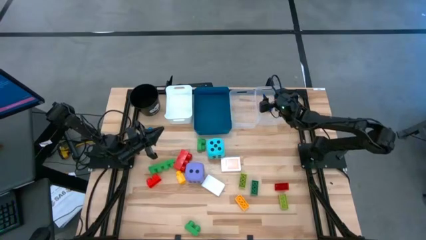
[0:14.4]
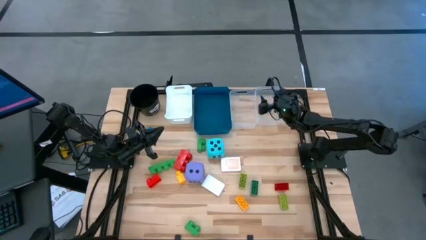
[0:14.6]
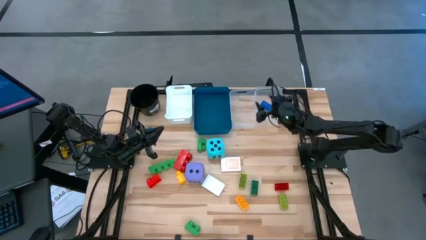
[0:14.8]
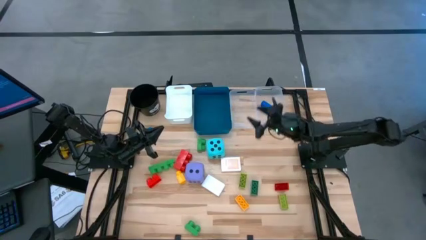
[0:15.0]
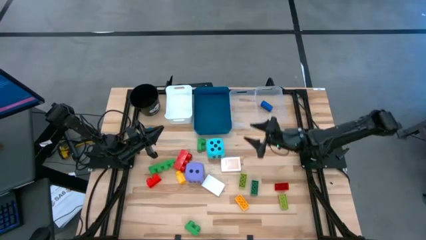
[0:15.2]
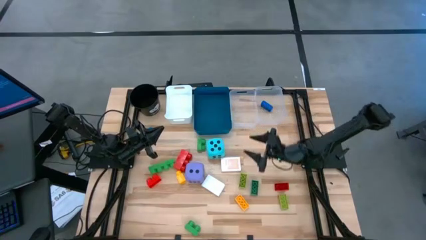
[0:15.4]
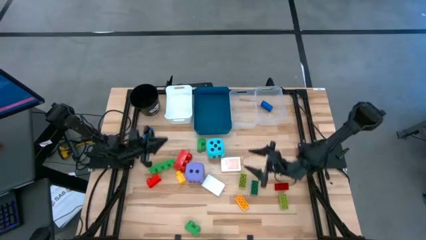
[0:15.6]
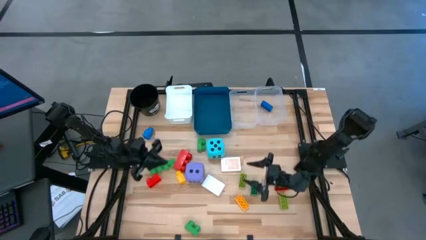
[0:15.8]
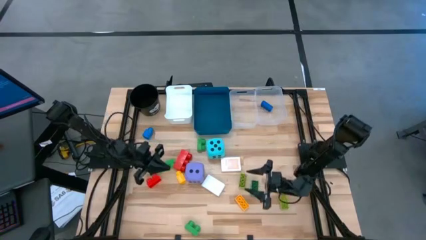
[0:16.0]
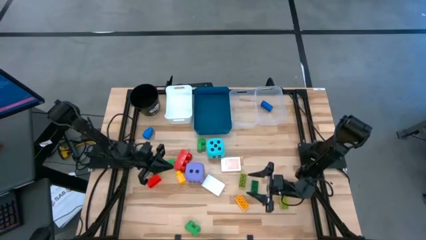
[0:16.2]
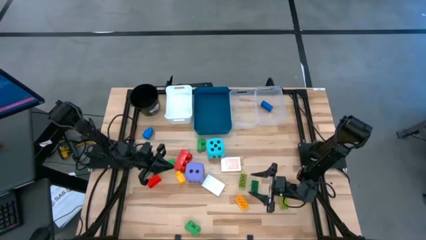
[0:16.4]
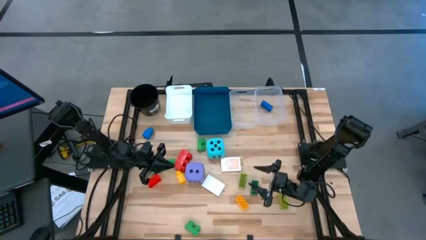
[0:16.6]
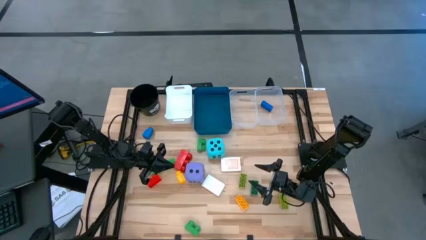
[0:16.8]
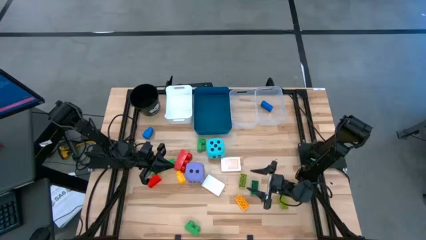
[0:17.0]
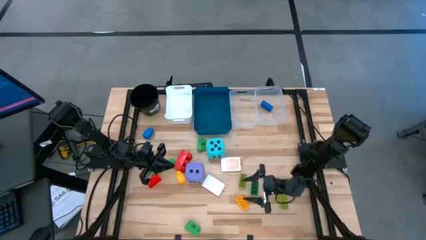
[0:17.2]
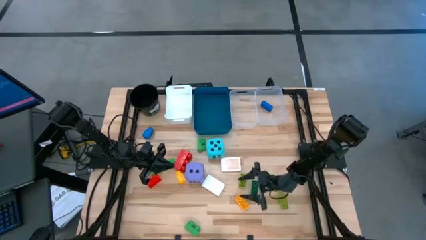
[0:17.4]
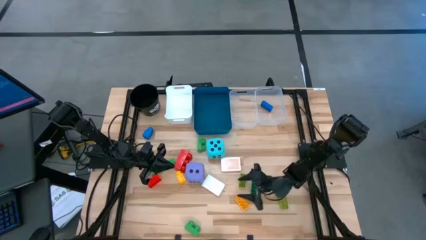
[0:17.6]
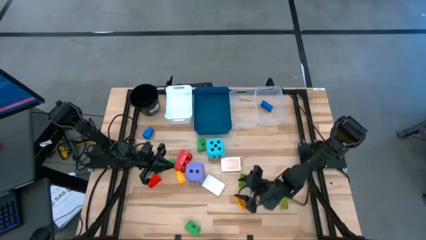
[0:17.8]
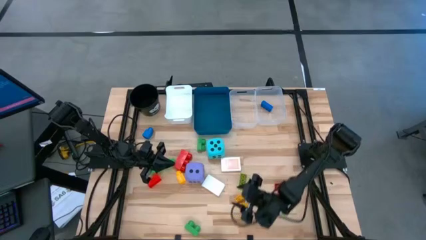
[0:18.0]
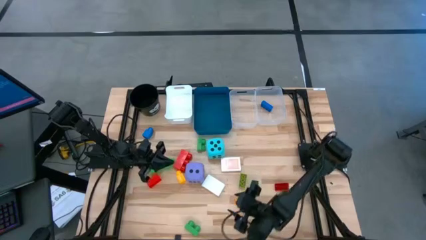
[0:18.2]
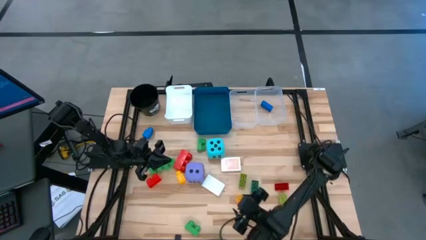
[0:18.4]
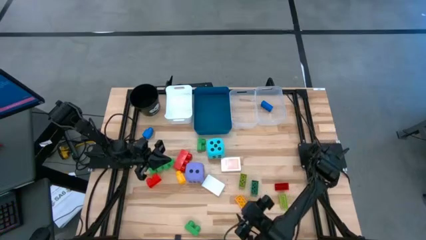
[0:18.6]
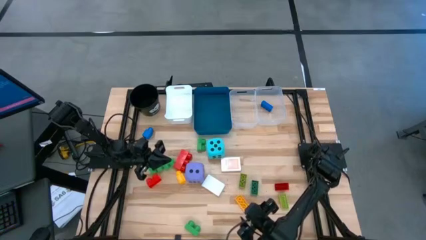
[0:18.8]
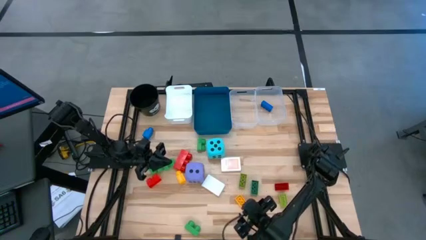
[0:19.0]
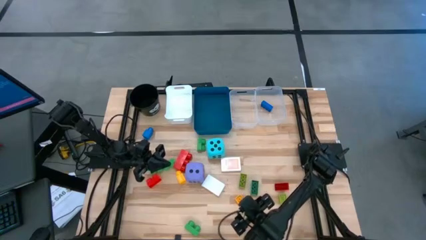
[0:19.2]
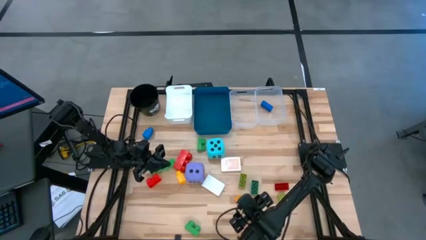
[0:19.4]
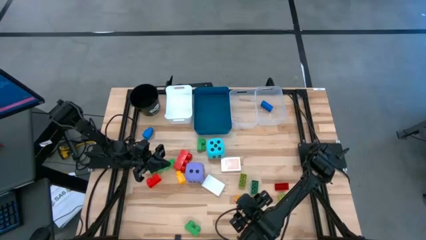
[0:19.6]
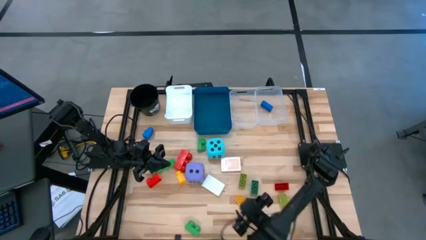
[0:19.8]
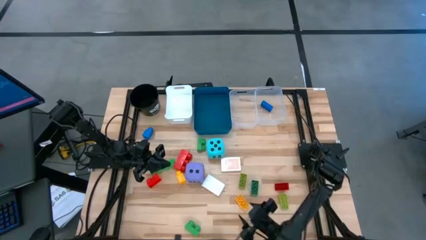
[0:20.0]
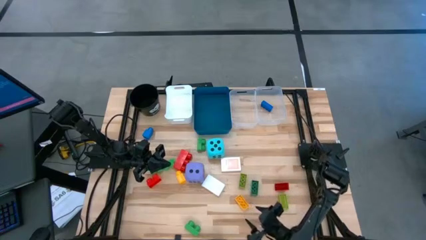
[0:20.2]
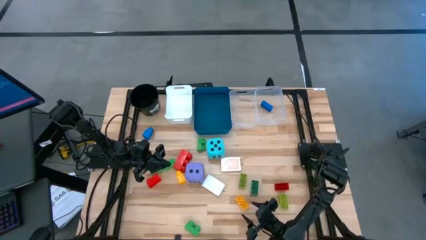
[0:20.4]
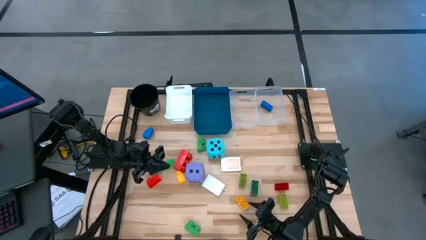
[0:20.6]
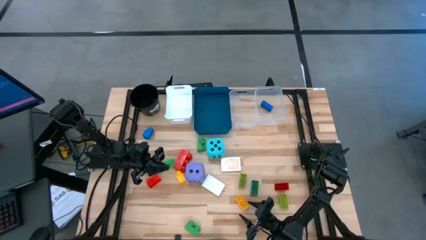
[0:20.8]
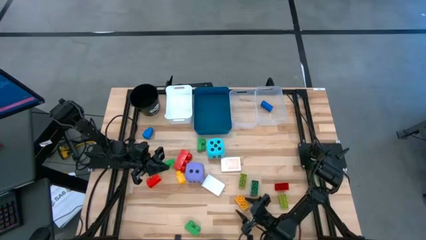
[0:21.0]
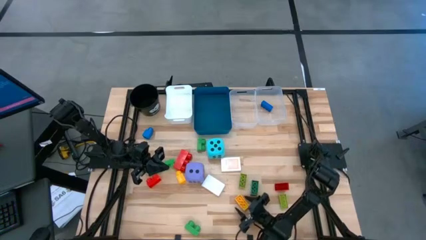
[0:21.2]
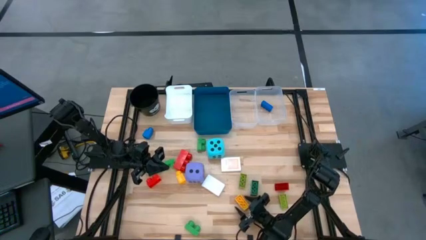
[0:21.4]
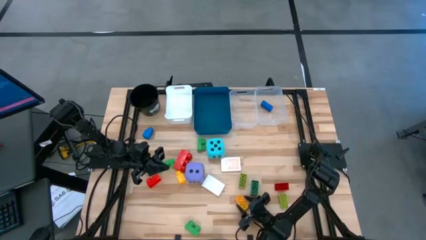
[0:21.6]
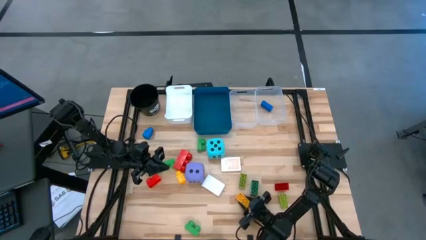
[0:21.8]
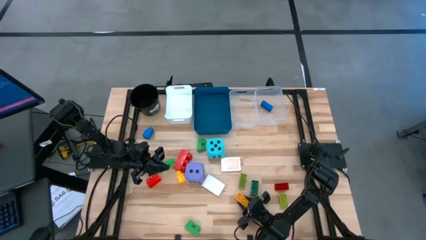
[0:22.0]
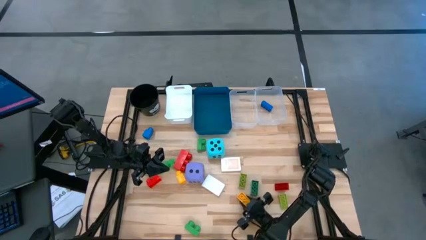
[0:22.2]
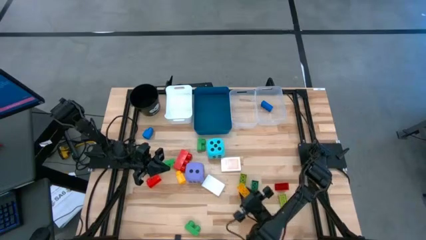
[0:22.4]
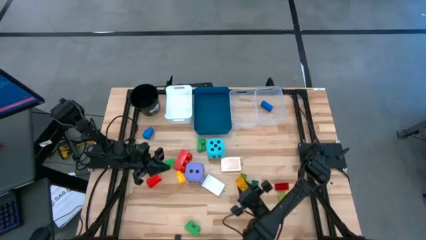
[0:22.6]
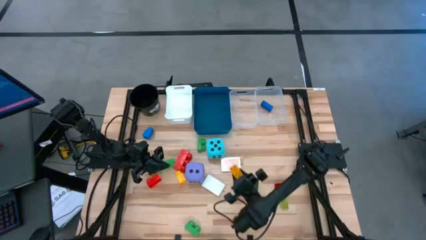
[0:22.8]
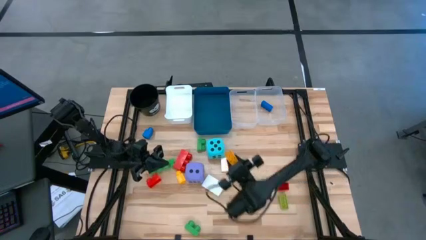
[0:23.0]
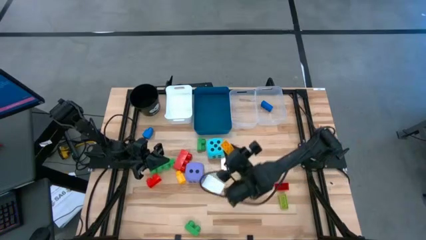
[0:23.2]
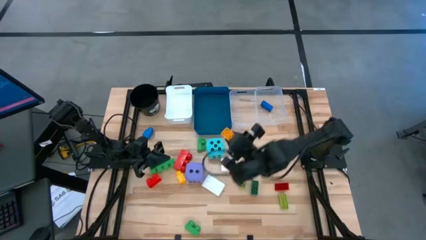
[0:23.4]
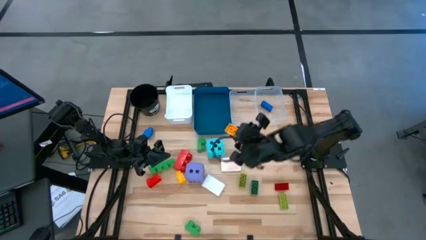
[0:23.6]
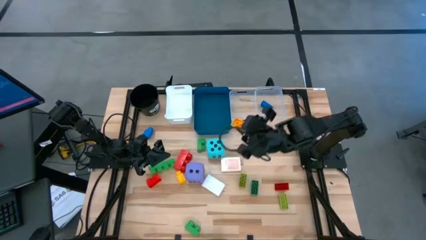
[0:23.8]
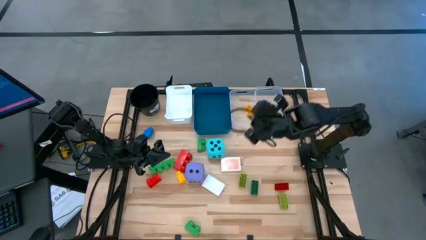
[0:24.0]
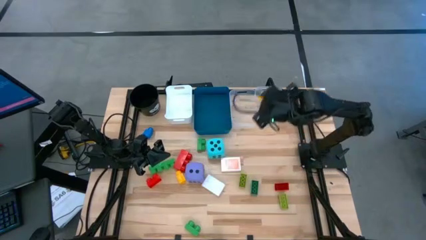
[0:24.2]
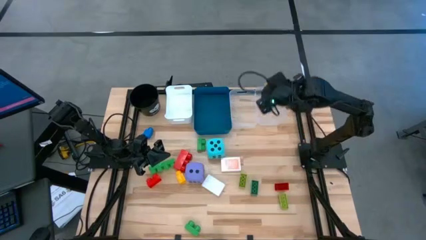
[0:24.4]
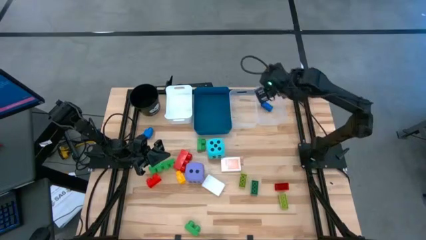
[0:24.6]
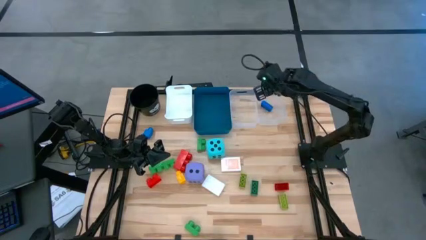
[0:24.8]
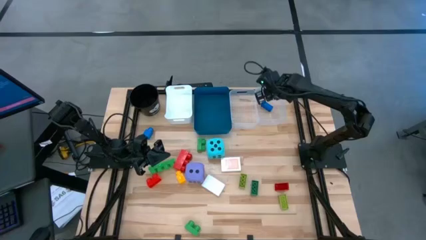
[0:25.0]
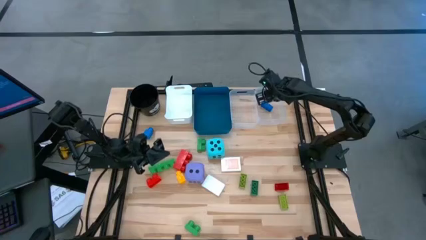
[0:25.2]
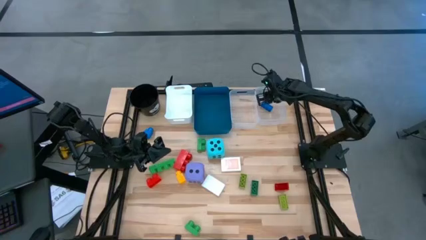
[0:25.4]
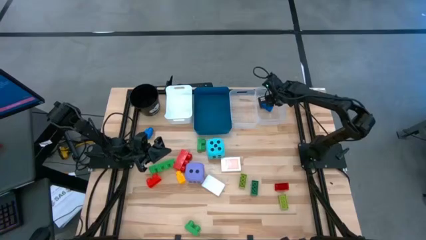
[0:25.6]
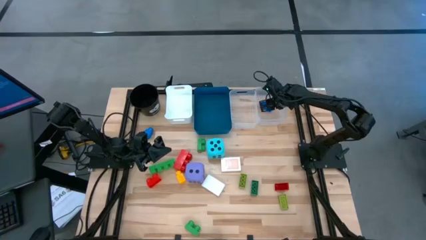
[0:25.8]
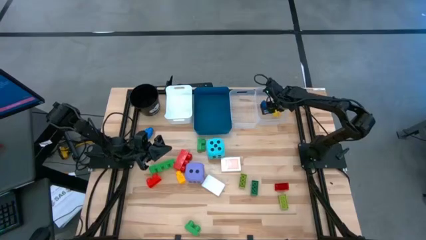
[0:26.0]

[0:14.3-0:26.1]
Task: Pick & Place Toys
Put the small yellow game piece into the right transparent bin

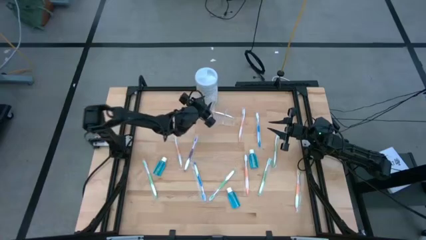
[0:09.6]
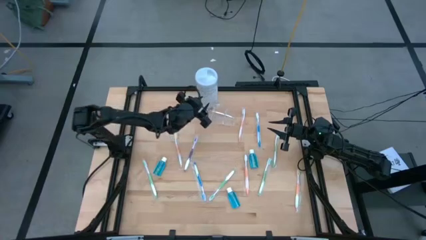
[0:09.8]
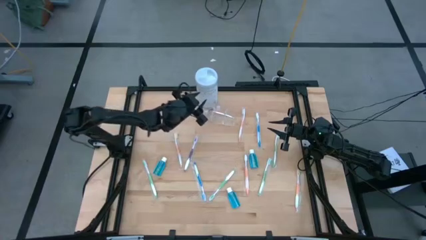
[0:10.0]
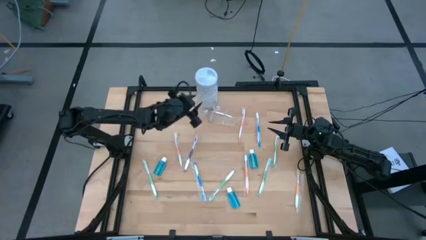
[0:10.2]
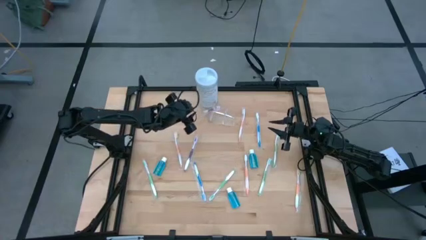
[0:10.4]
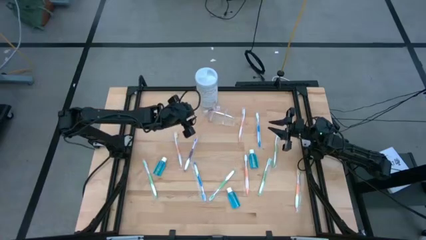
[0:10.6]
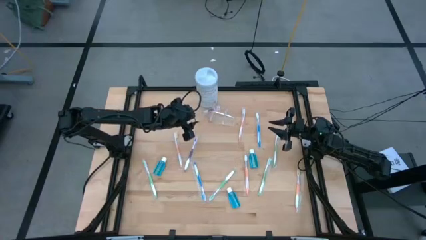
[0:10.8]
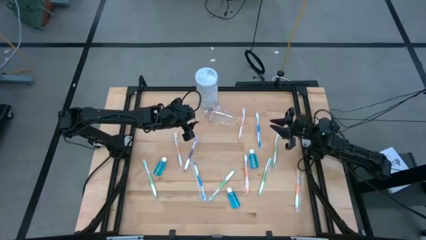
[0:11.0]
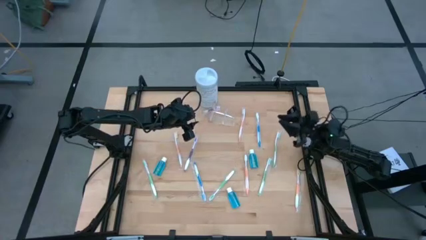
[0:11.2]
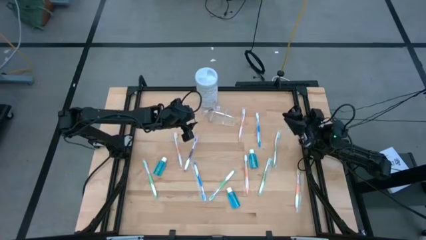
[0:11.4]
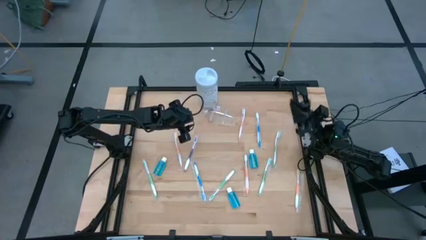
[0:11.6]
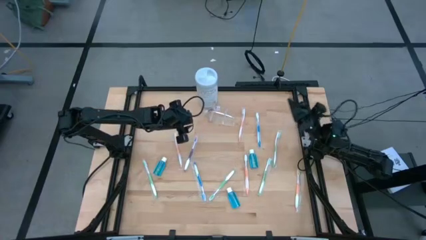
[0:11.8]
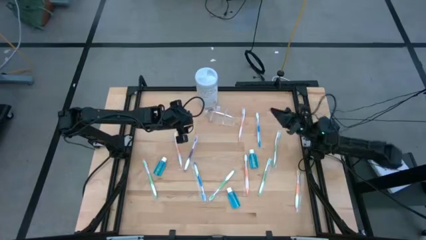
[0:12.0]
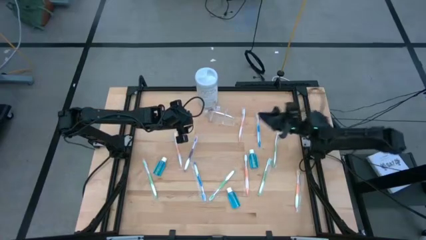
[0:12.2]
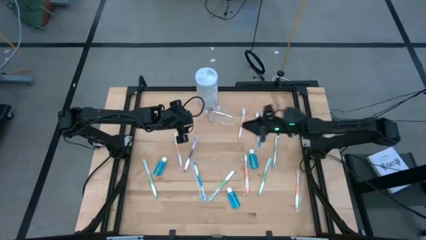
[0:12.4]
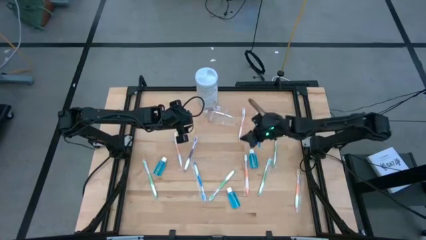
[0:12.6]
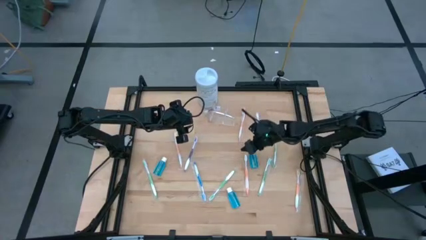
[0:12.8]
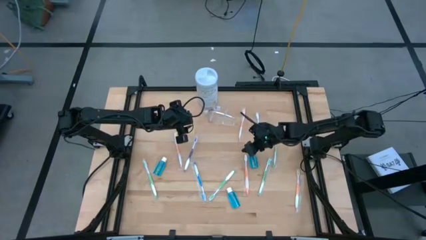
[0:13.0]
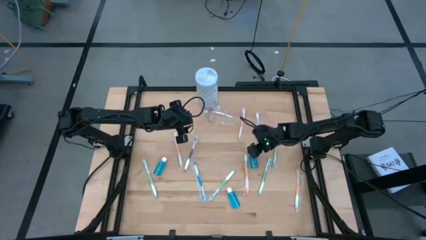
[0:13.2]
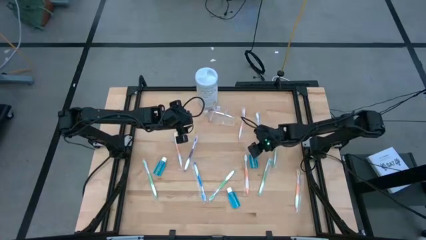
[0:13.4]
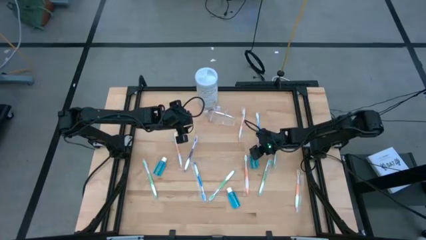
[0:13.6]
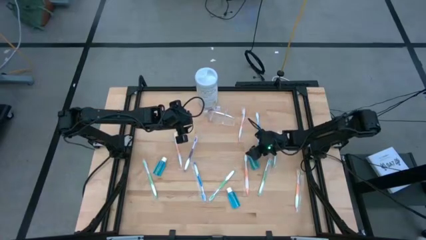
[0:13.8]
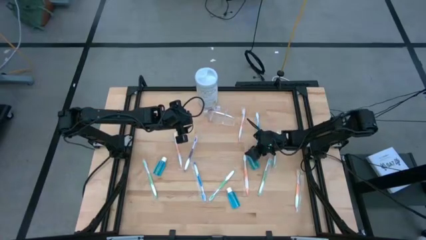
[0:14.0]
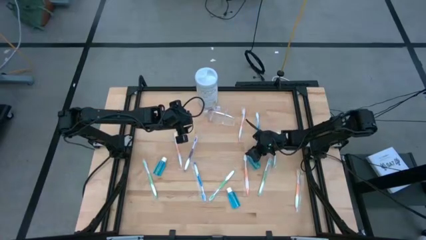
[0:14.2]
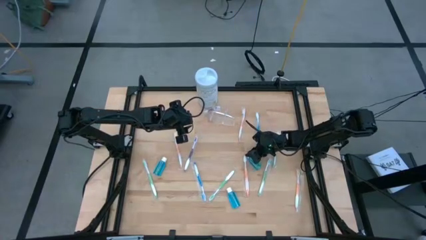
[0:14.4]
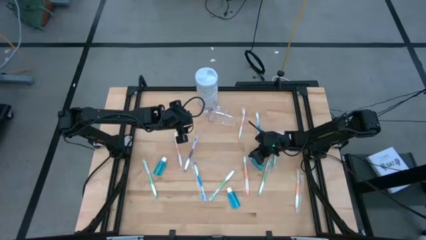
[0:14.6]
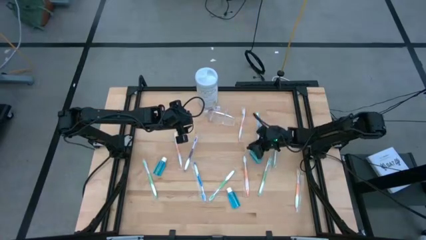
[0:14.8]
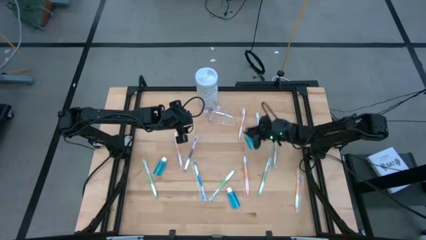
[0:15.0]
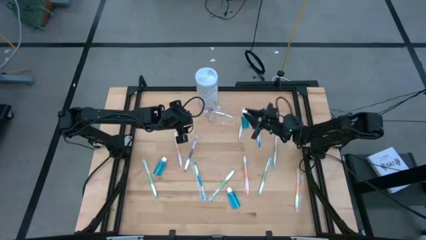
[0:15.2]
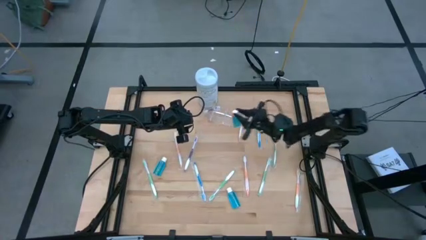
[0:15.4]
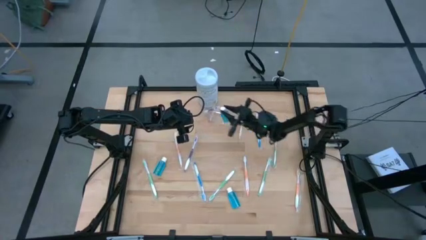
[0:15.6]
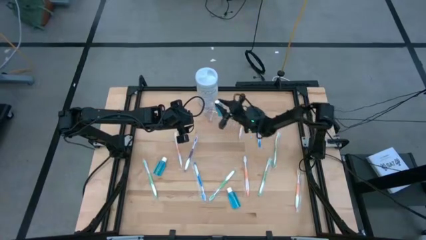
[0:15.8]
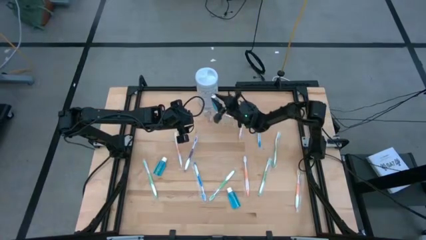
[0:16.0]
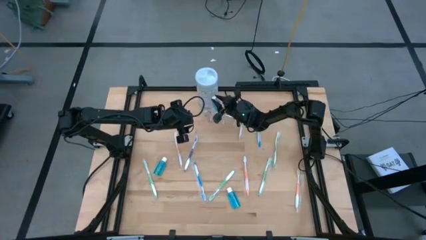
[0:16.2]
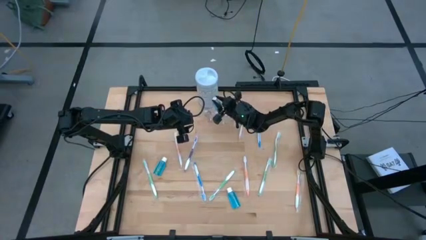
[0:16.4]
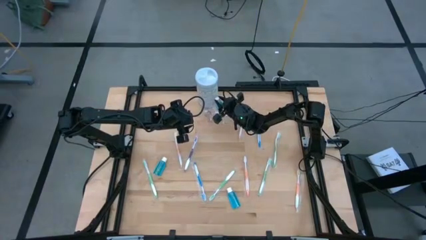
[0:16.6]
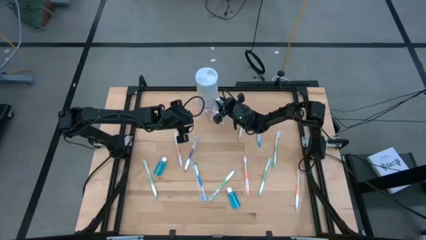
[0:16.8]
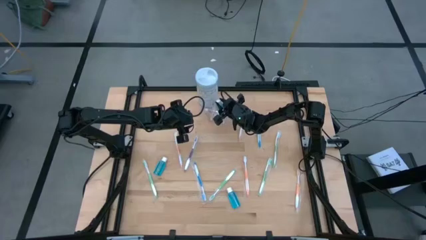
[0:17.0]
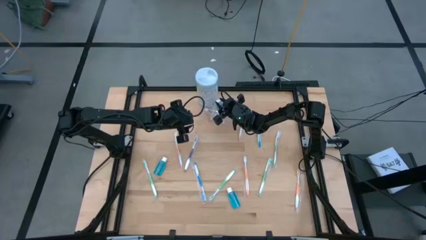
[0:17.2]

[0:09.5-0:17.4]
Task: Pick & Place toothbrushing station
Put the blue mouthwash bottle into the transparent organizer
